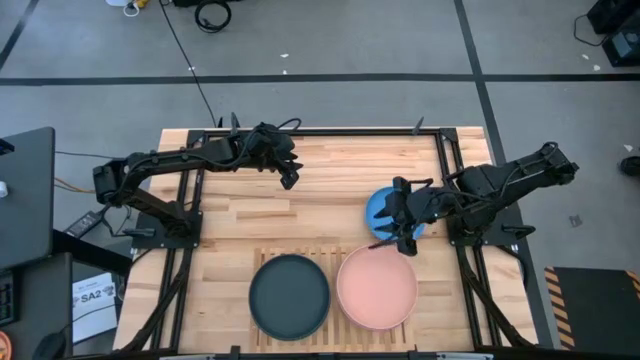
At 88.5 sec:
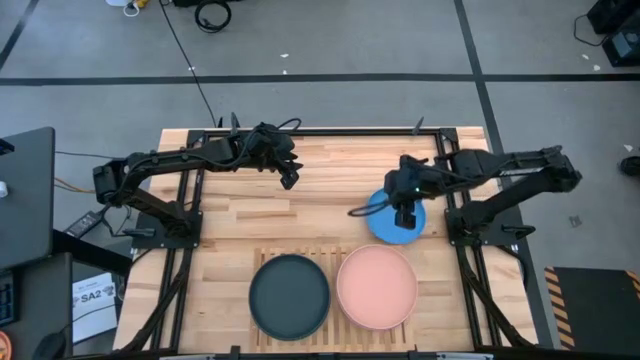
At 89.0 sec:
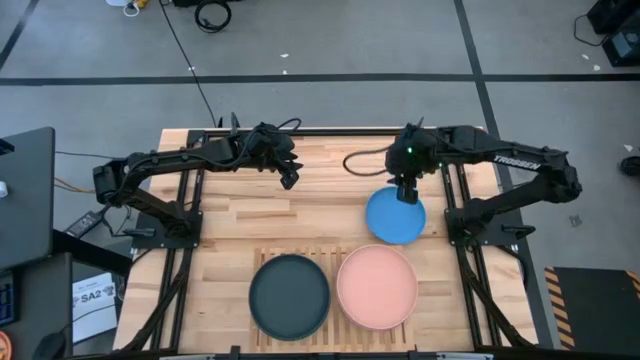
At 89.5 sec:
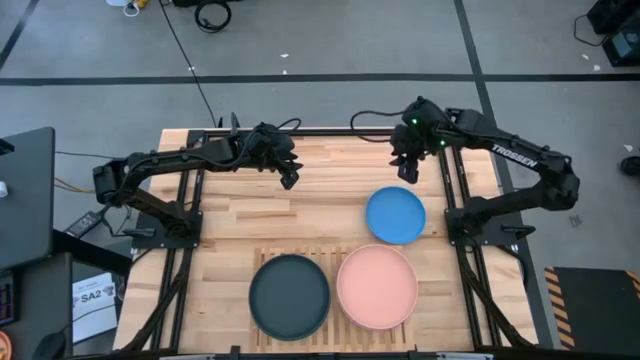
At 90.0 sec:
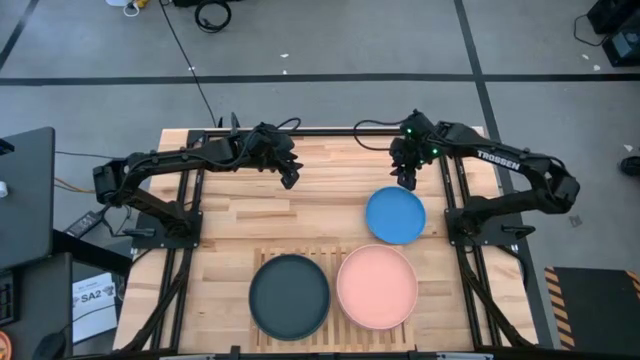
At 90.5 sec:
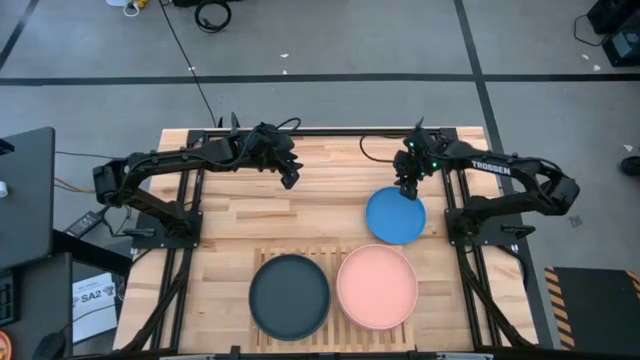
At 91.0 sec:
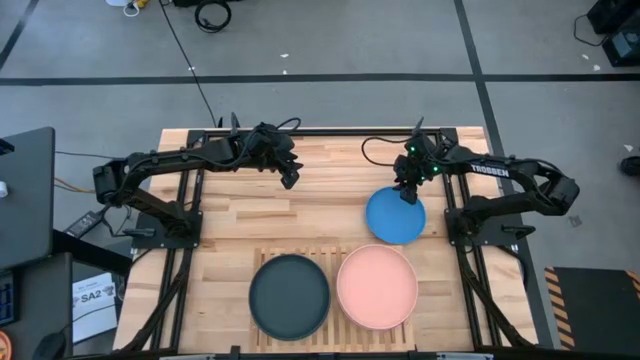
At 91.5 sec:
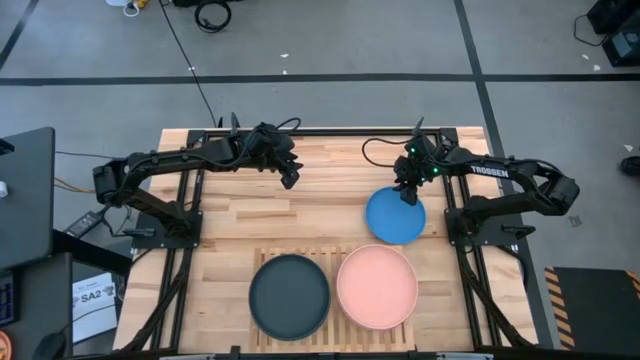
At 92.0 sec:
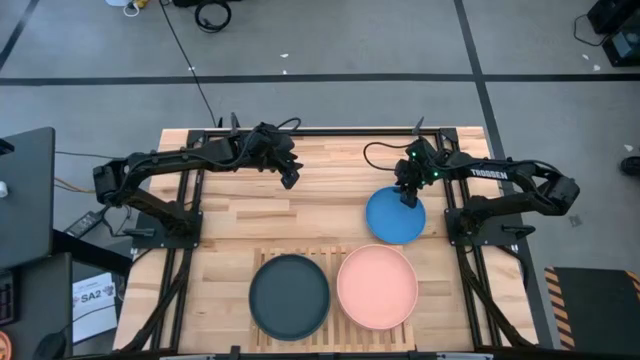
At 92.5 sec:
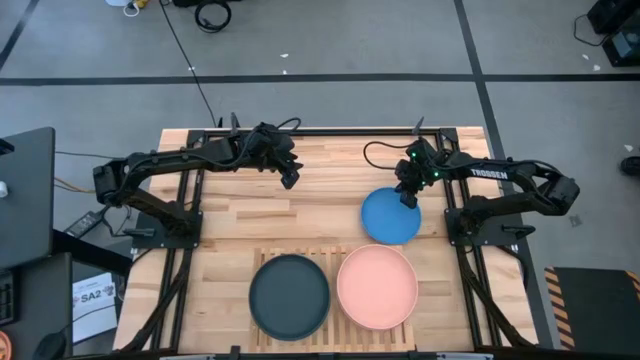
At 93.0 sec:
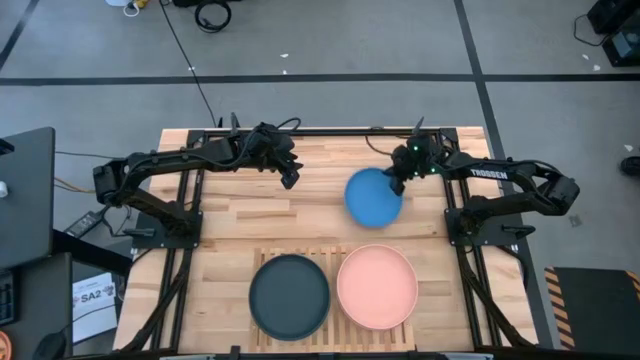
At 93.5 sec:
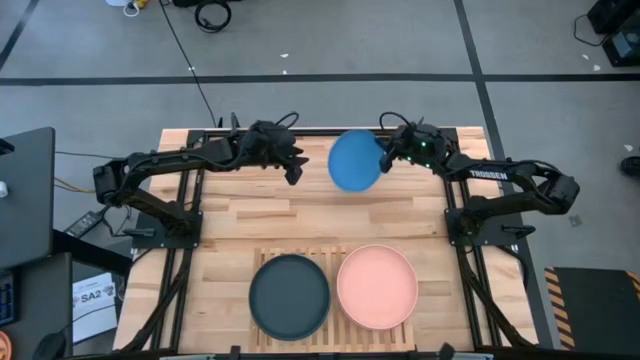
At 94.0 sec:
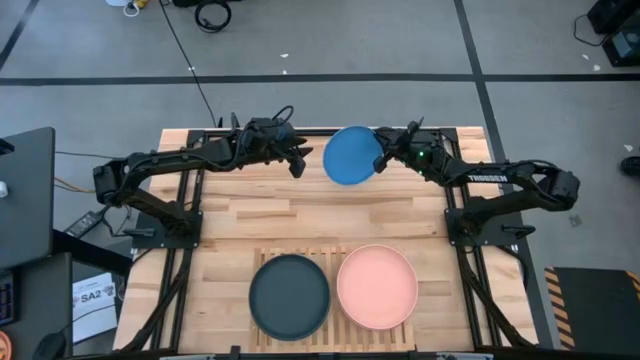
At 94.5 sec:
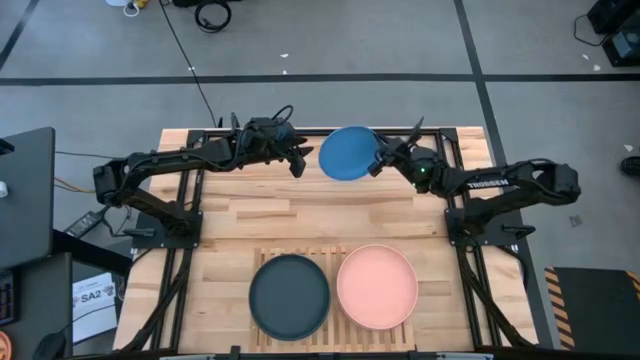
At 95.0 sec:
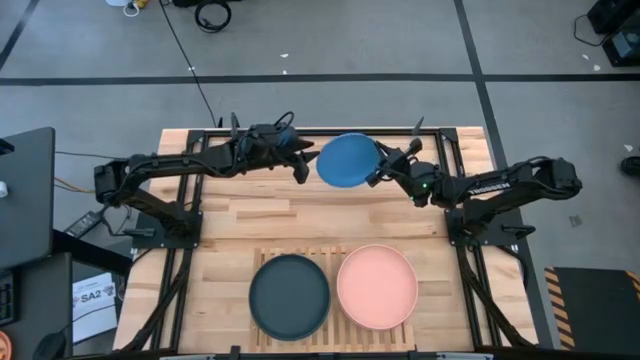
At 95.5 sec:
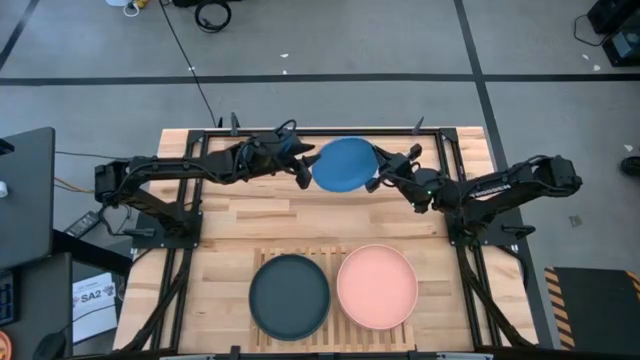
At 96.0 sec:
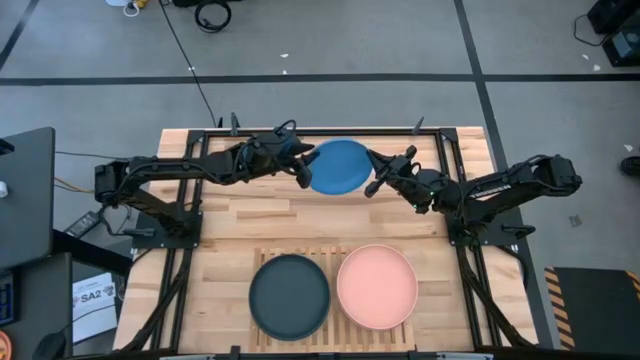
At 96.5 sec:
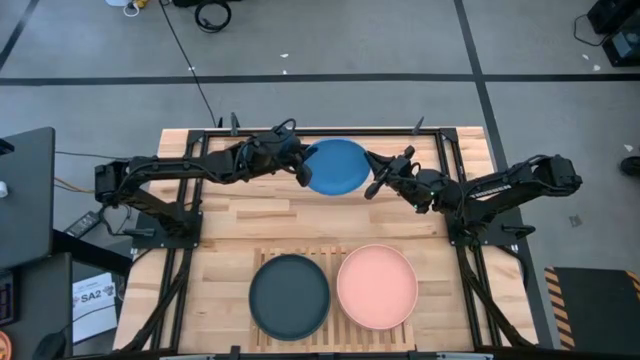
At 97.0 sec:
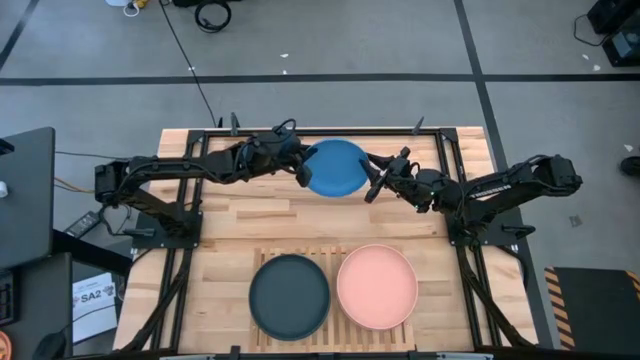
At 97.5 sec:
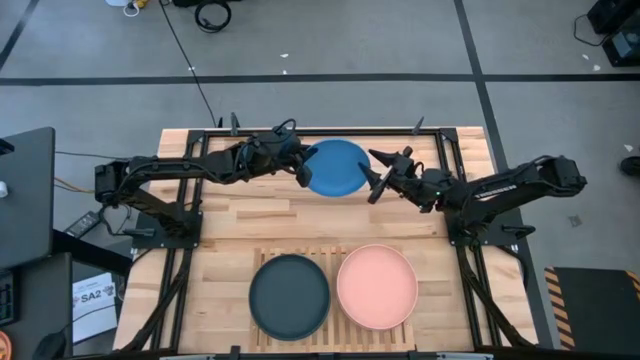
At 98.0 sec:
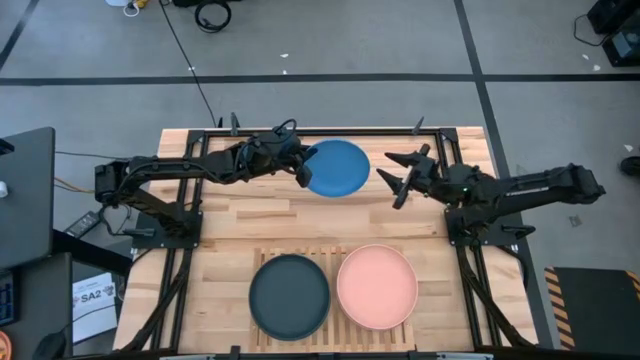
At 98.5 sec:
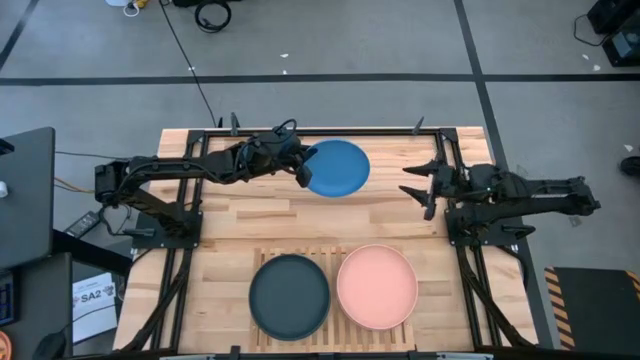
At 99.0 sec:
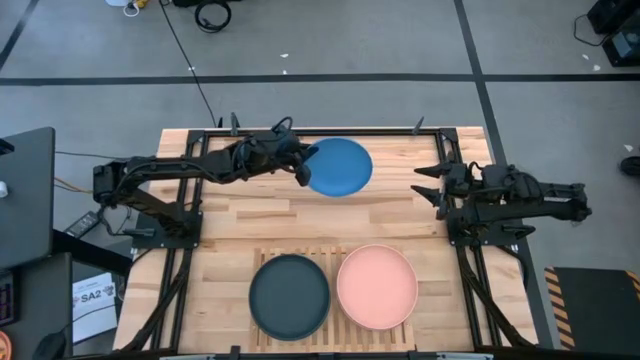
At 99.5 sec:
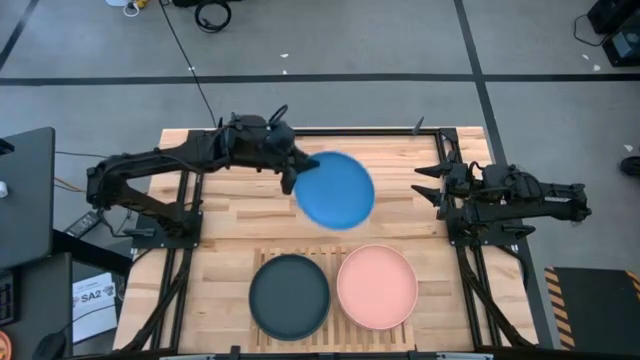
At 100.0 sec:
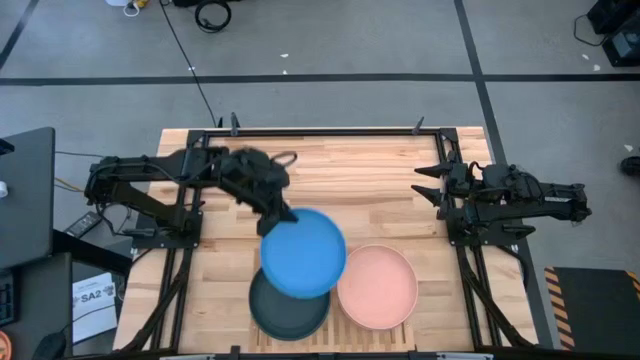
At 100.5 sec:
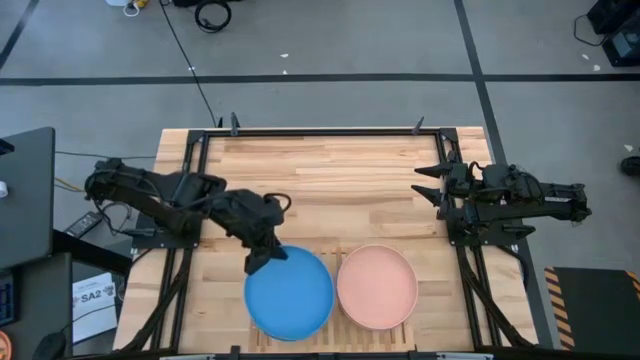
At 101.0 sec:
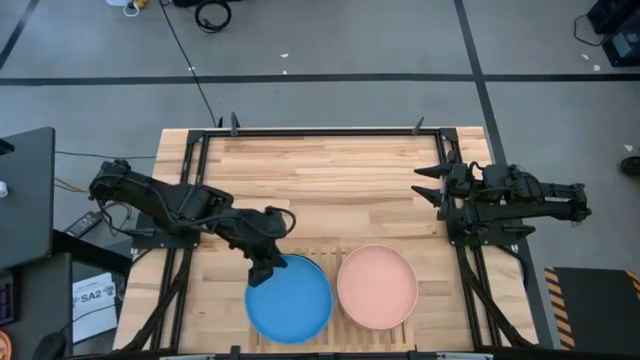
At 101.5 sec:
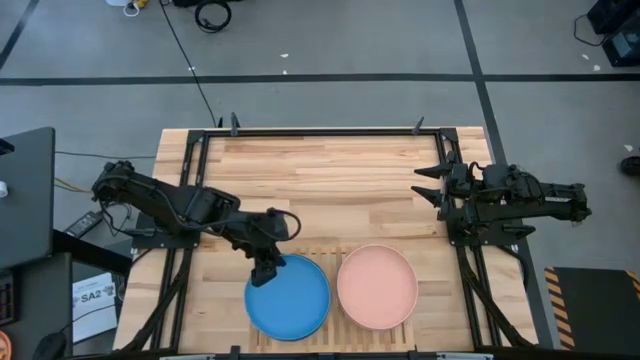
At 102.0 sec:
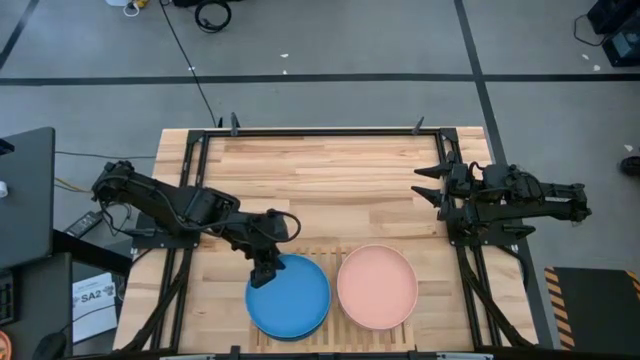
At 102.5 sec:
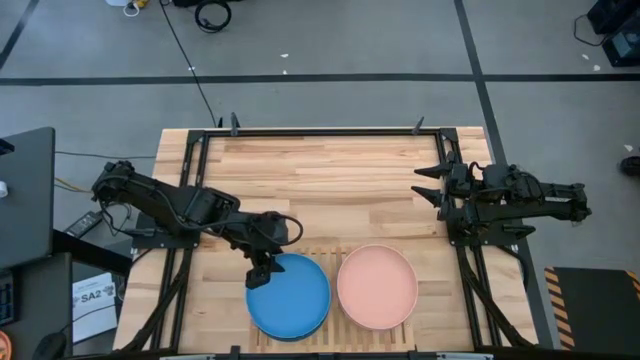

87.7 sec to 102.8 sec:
Task: Place and stack plates onto a shelf
Stack the blue plate on top of the black plate on the shelf

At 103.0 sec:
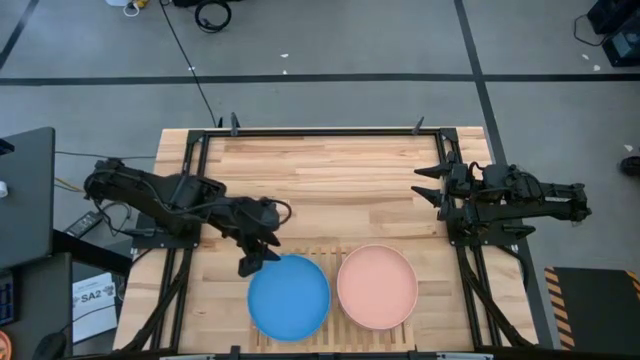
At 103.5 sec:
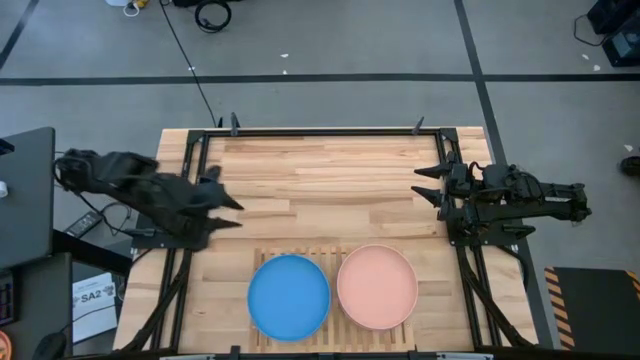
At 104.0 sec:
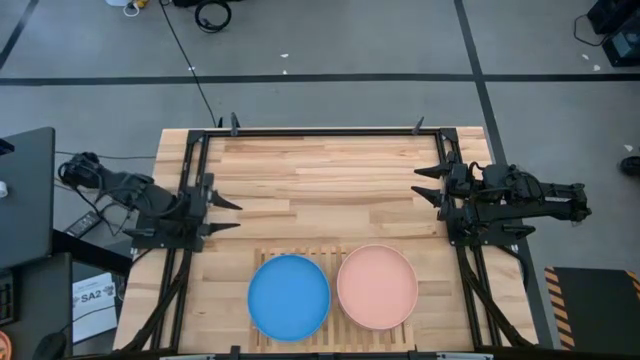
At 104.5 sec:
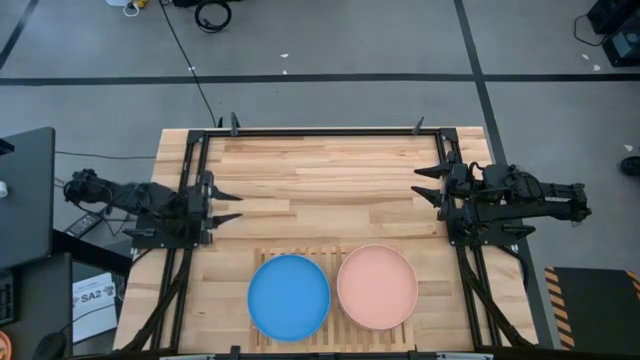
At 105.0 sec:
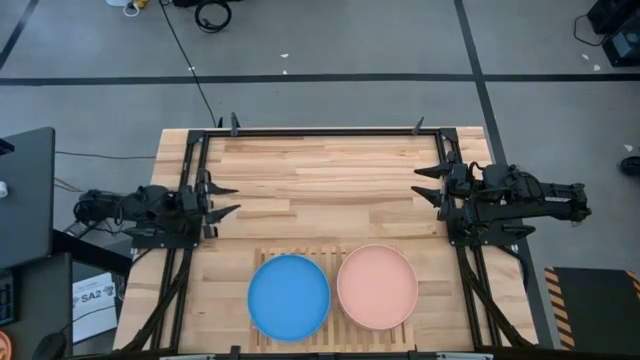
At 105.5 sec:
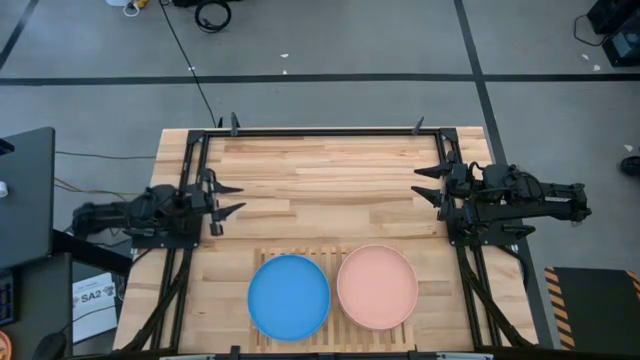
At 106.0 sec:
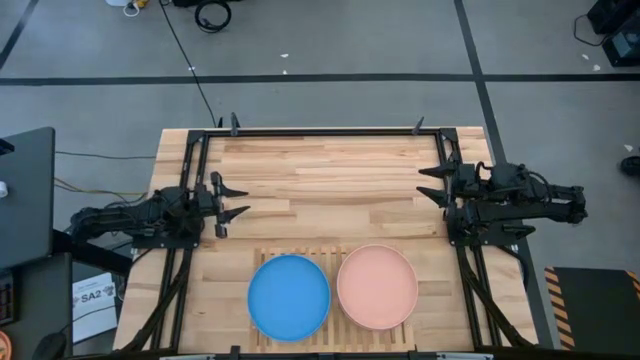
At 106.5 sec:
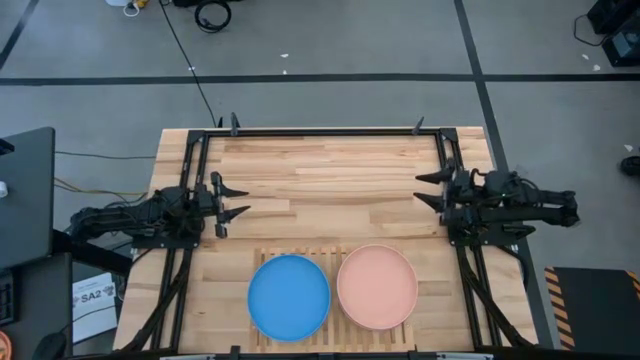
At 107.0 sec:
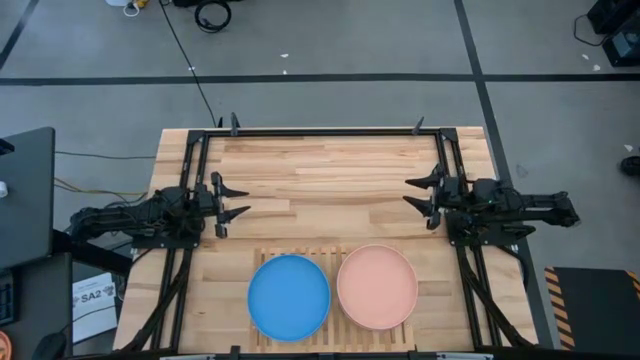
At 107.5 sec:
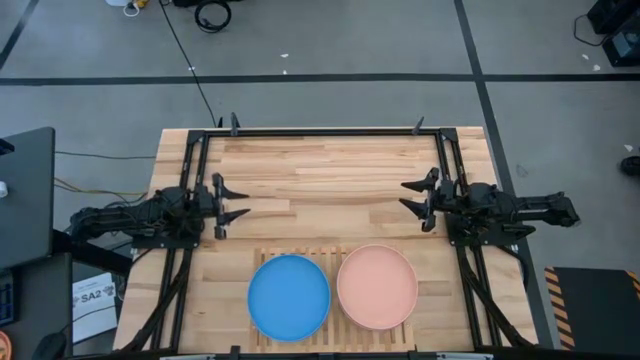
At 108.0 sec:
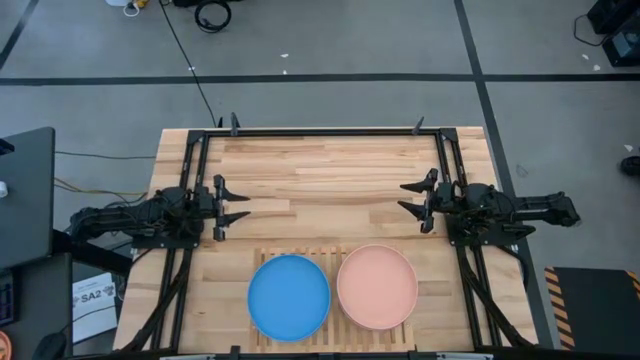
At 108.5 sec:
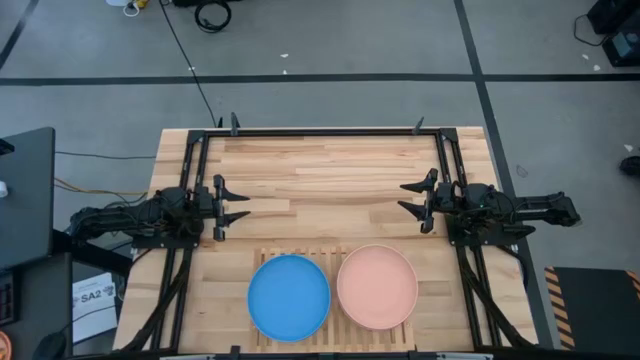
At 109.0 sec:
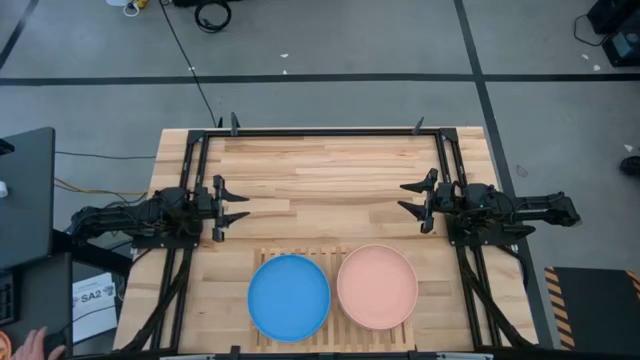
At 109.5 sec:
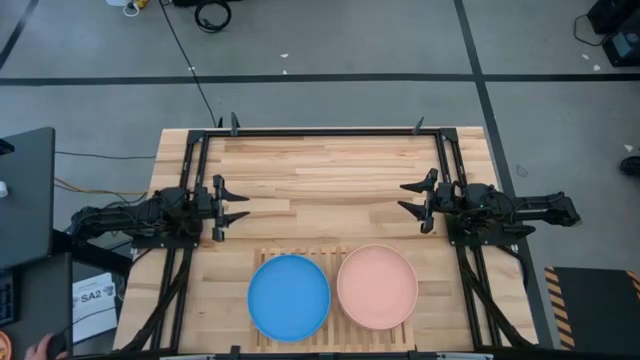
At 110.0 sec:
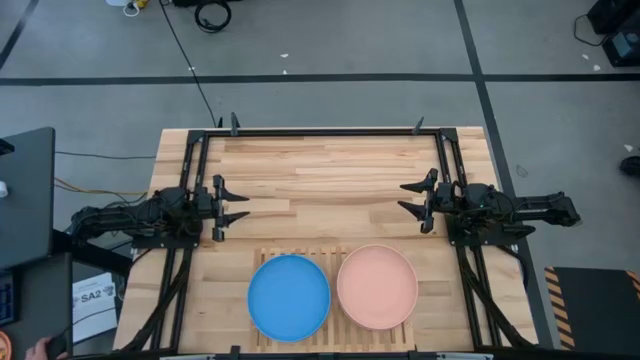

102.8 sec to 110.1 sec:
Return to Home Position
